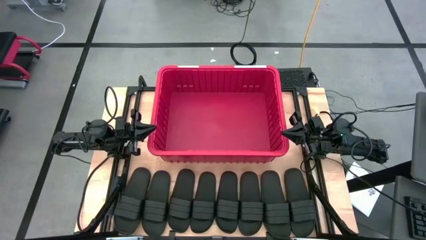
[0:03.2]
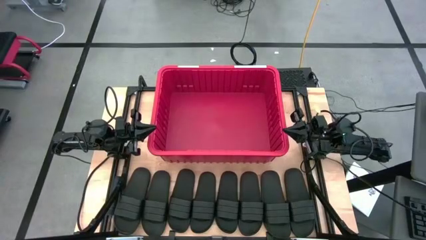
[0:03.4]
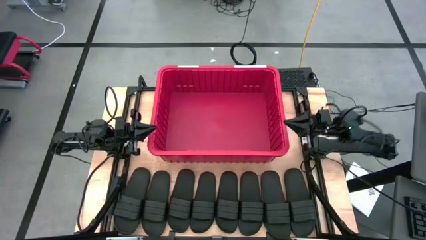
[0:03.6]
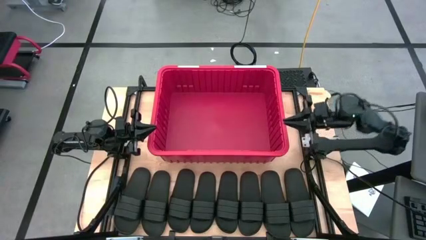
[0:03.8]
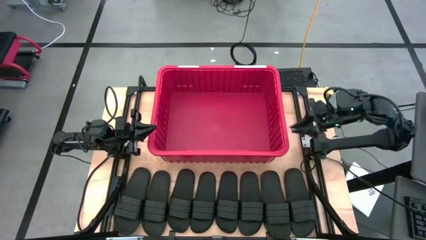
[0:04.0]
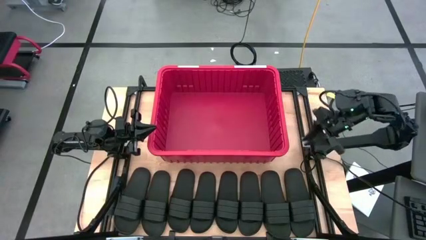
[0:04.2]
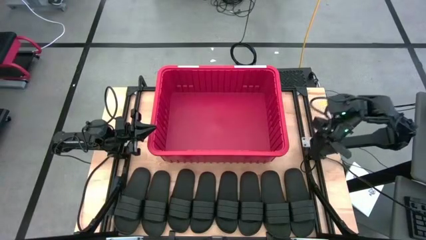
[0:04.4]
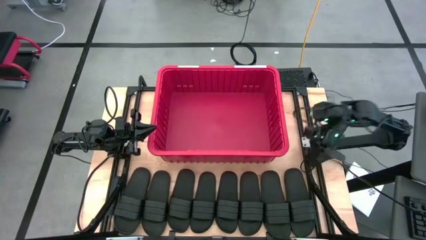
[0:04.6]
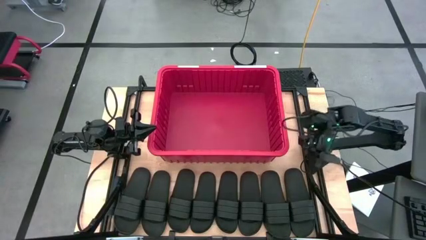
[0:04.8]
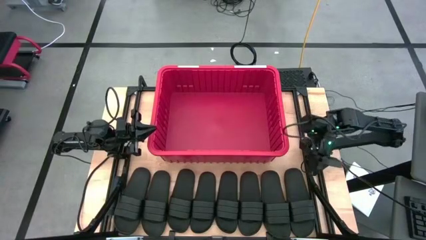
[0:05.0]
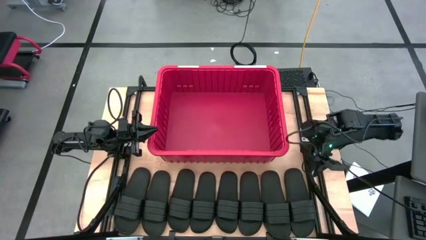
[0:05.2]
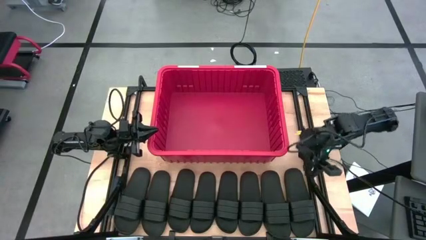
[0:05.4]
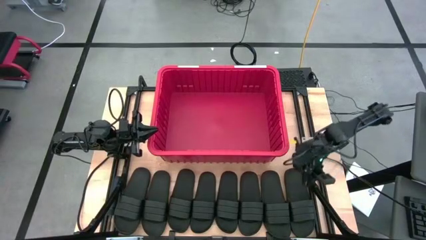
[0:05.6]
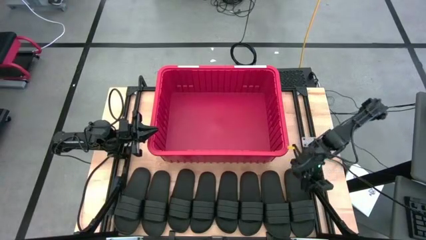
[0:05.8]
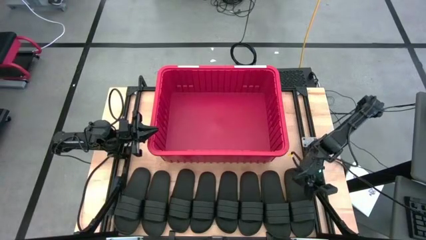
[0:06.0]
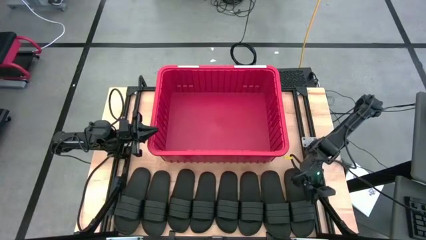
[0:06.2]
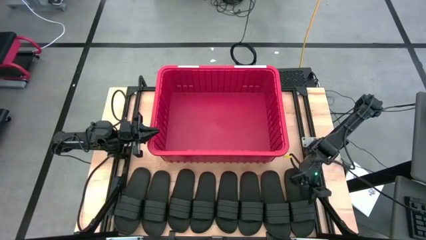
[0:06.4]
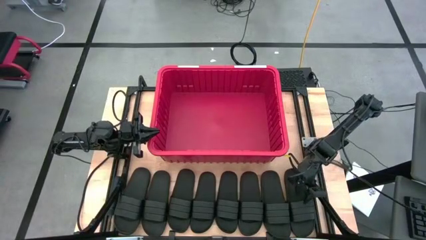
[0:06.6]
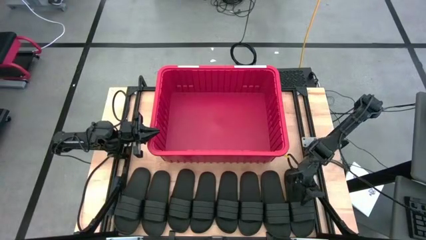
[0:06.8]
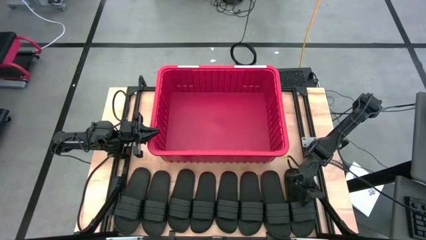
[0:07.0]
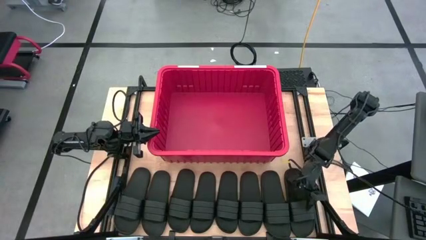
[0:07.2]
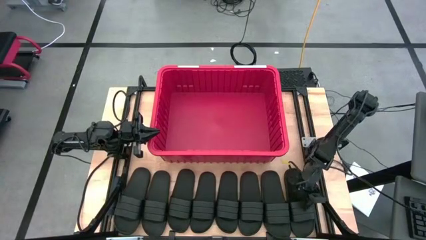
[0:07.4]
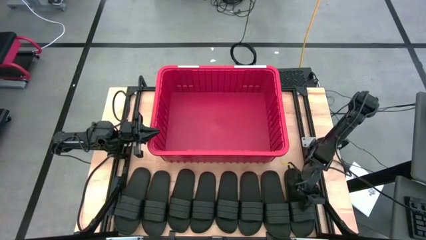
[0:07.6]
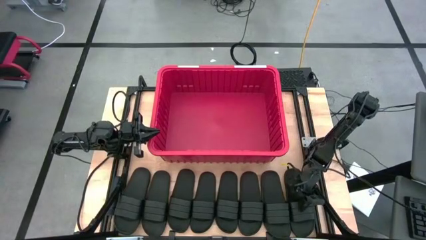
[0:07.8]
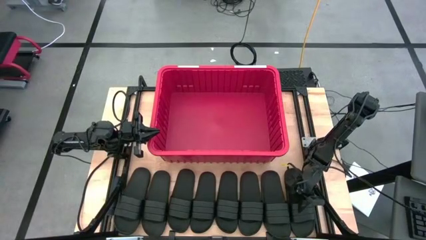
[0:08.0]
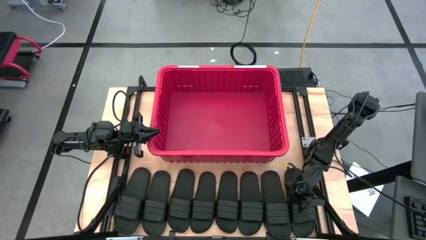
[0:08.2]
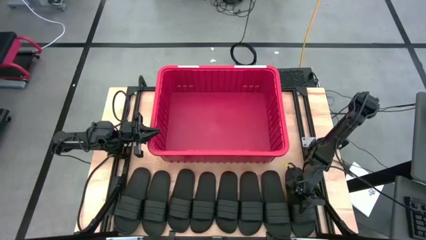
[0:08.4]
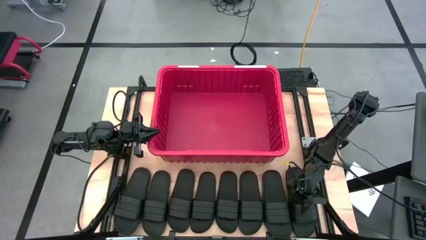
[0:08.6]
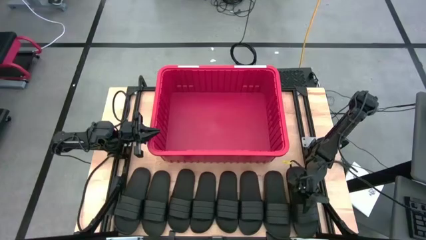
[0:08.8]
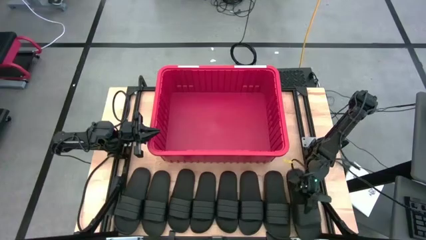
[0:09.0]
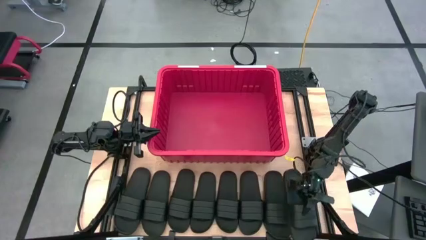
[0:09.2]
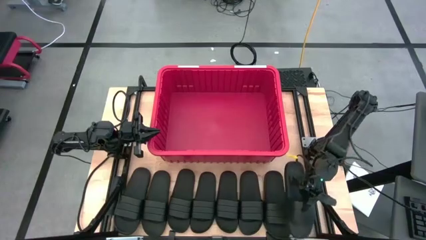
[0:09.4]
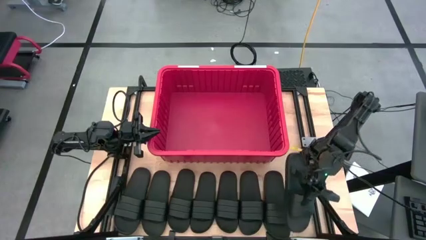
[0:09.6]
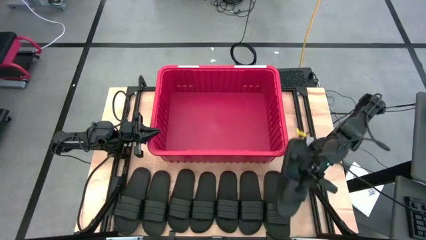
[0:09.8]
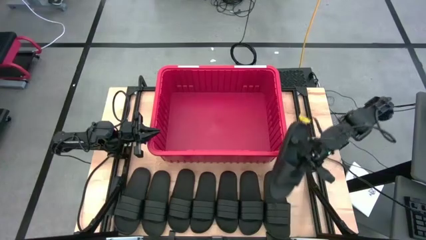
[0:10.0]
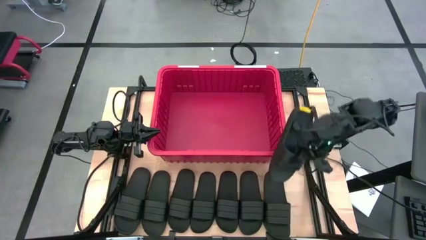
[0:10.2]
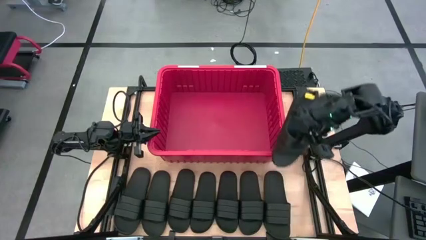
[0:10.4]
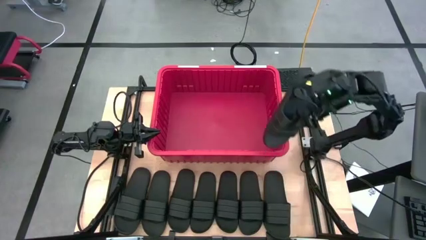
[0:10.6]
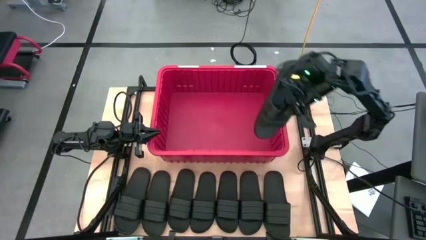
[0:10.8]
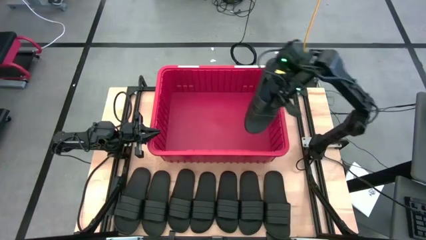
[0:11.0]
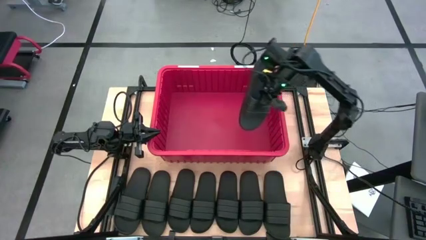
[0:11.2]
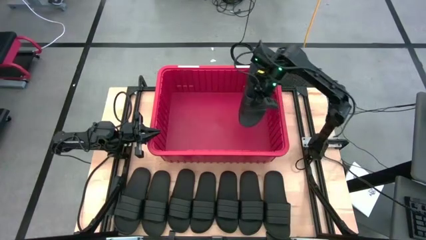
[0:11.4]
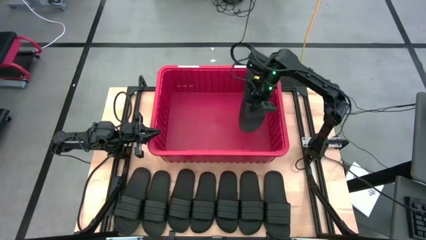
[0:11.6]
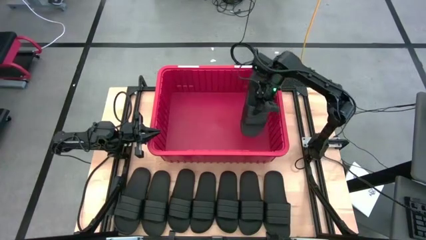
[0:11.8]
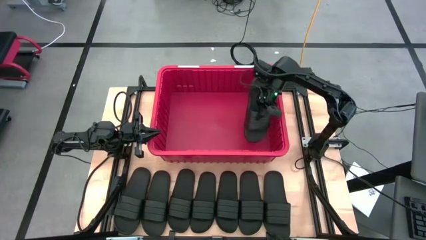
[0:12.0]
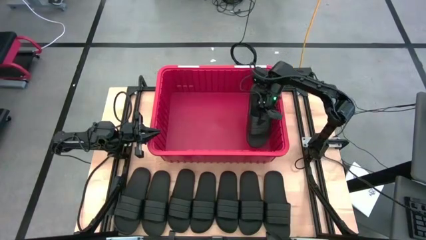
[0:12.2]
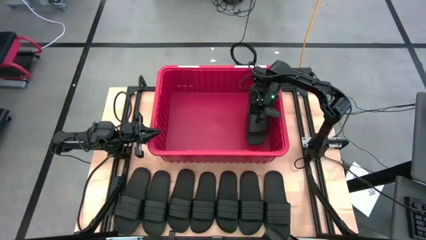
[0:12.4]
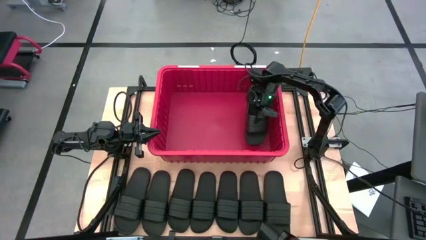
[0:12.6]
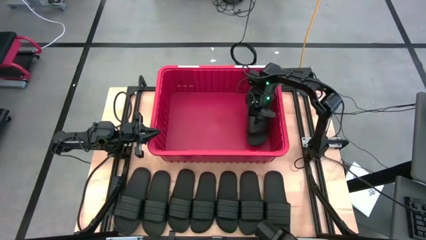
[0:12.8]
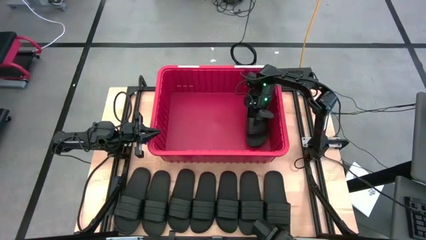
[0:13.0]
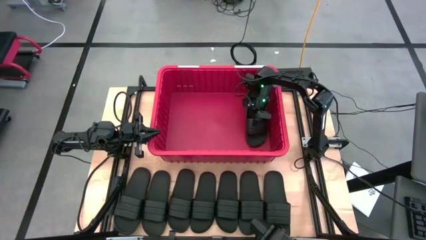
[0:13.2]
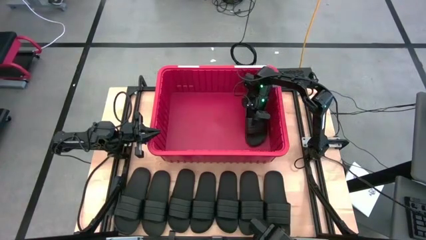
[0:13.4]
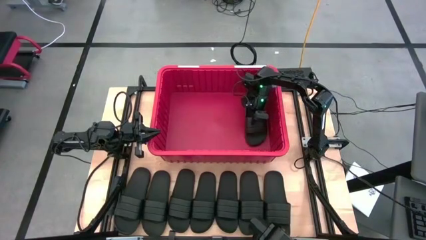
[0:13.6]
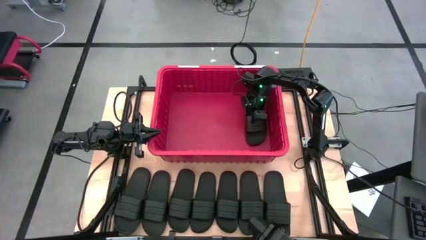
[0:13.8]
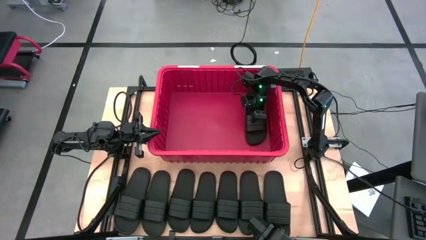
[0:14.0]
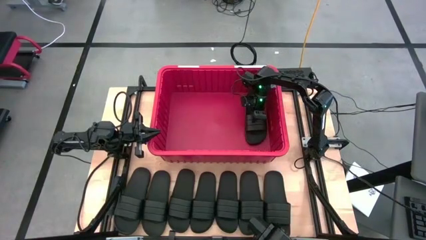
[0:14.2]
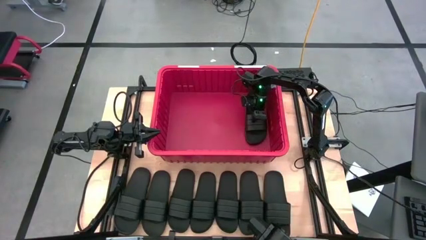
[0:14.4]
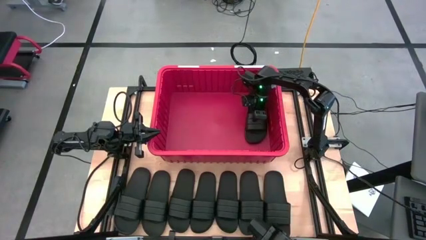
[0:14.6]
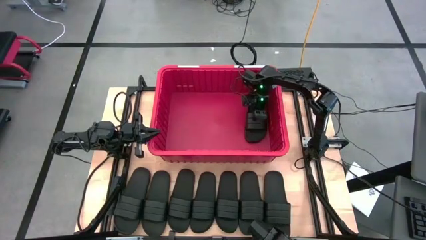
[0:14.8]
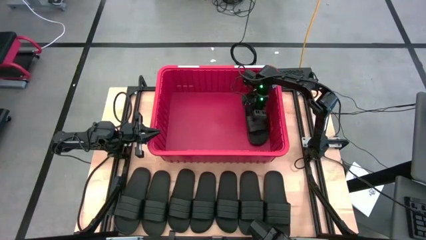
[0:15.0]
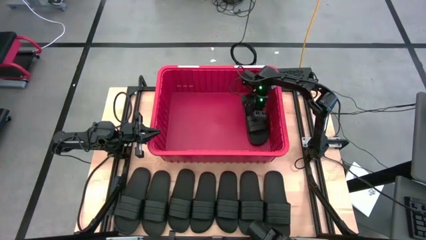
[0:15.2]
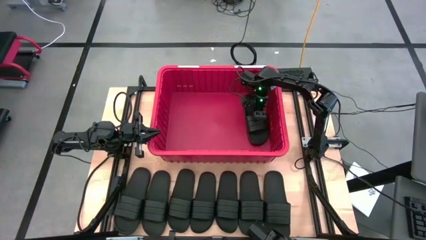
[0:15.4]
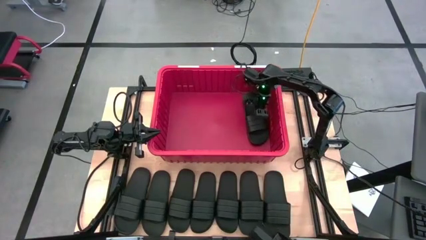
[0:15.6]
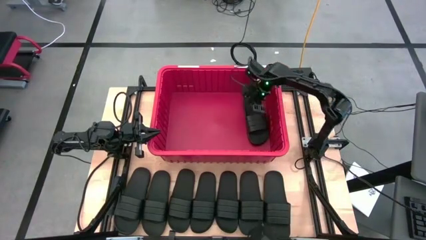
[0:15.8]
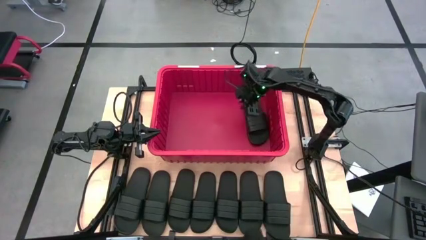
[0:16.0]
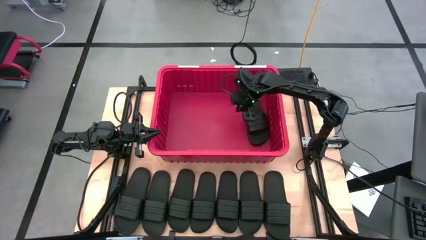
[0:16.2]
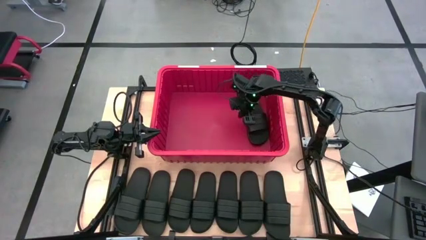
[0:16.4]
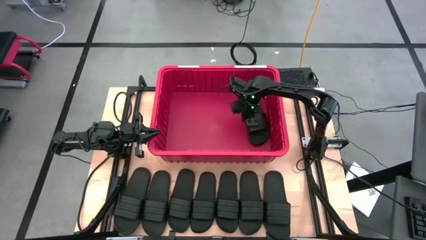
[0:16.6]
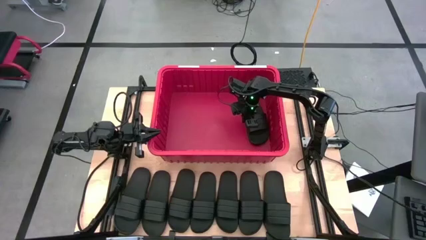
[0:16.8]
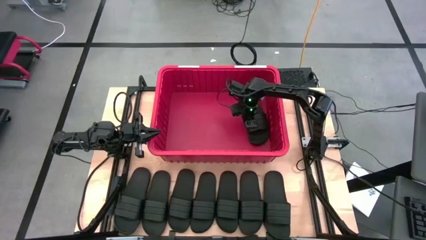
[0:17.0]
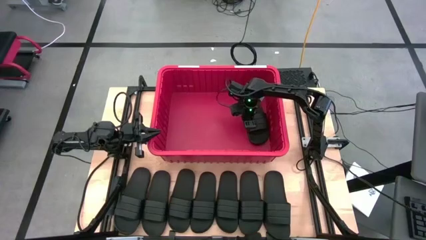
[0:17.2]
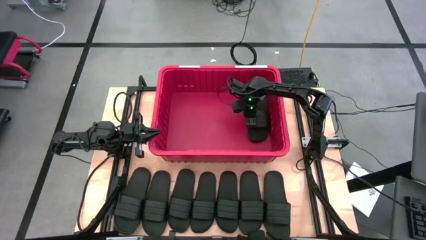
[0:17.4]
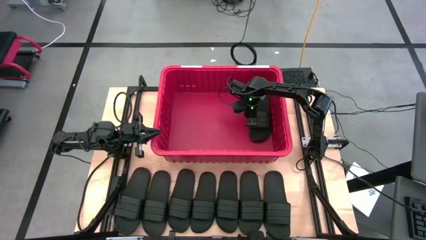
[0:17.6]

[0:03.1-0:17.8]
Task: Pick and place slides into bin
Put the black slipper into the bin
